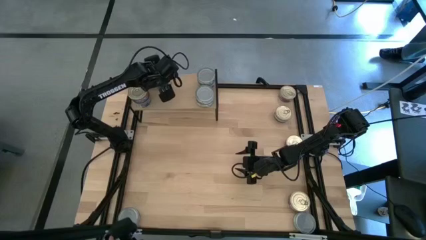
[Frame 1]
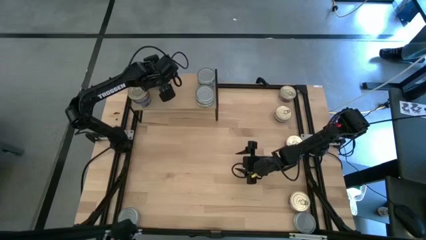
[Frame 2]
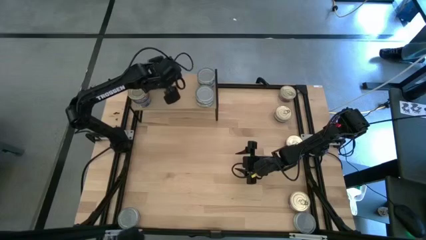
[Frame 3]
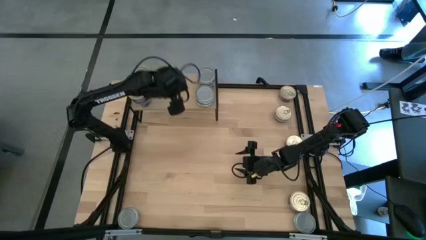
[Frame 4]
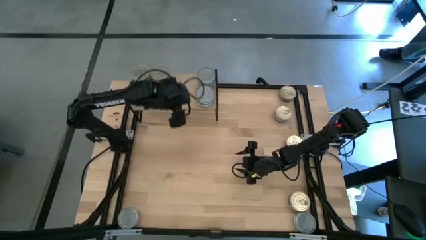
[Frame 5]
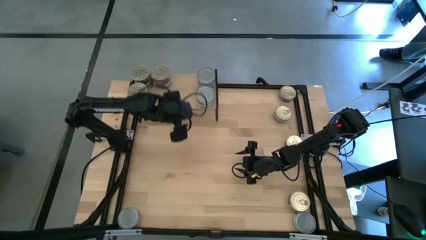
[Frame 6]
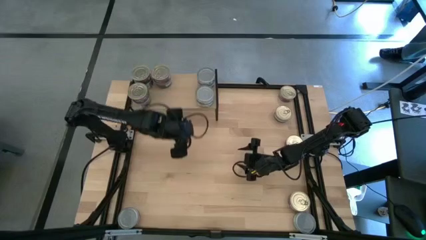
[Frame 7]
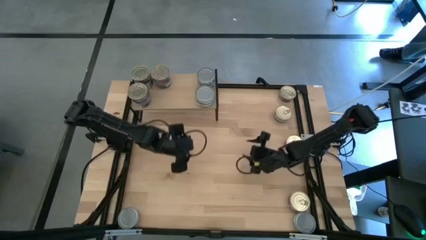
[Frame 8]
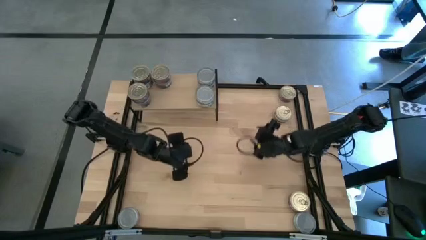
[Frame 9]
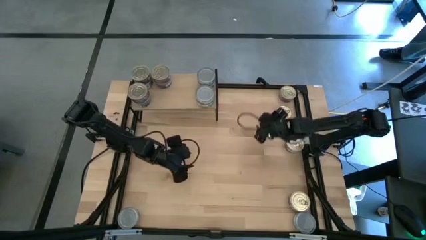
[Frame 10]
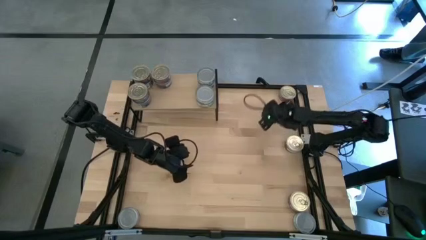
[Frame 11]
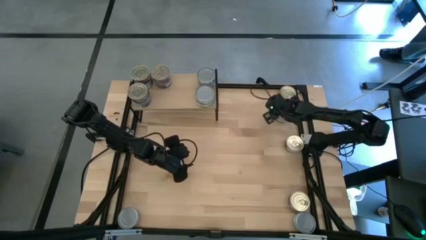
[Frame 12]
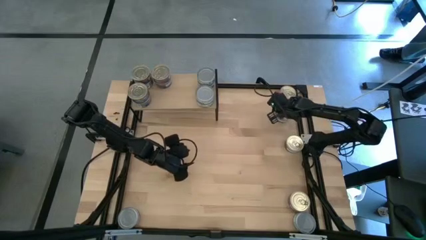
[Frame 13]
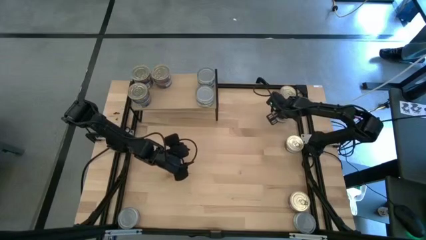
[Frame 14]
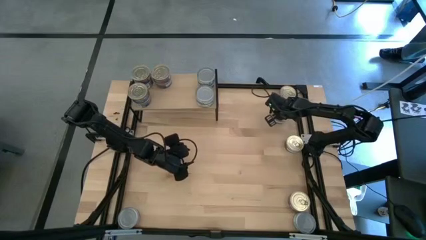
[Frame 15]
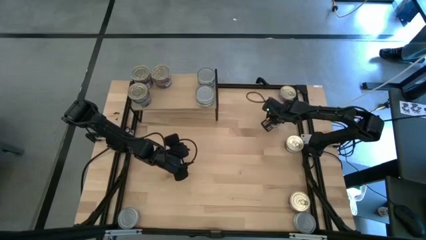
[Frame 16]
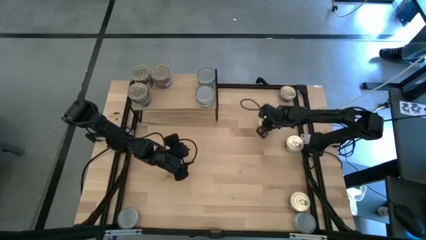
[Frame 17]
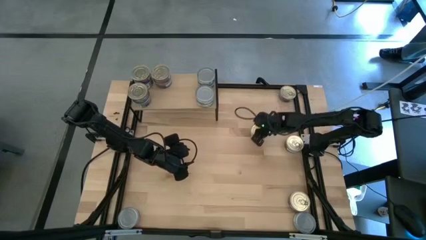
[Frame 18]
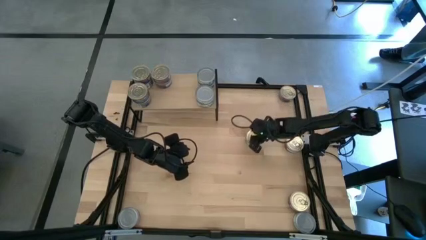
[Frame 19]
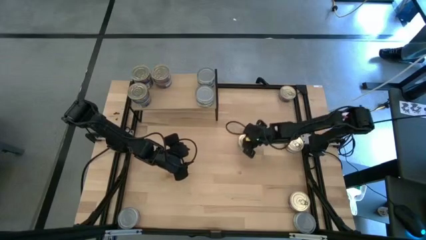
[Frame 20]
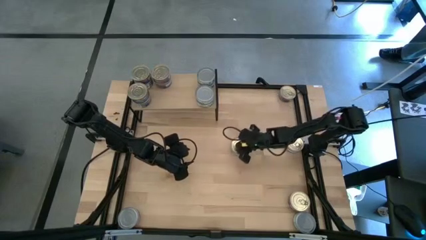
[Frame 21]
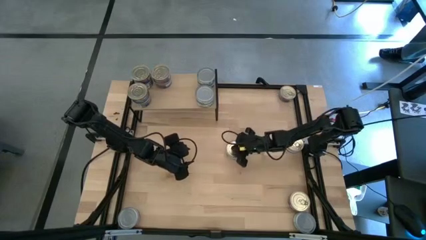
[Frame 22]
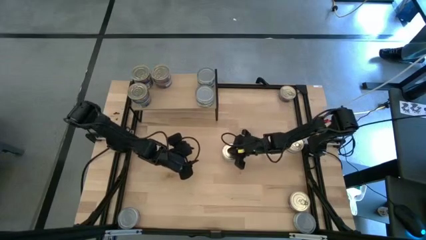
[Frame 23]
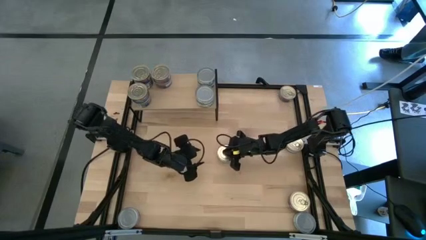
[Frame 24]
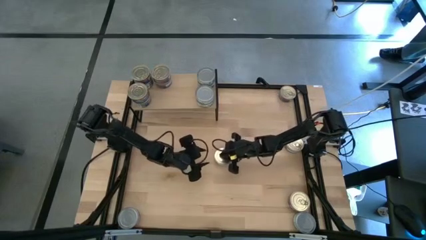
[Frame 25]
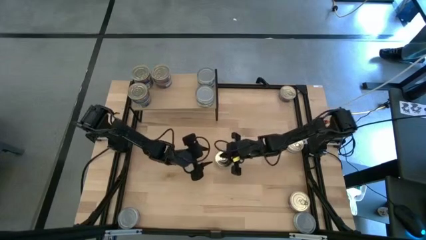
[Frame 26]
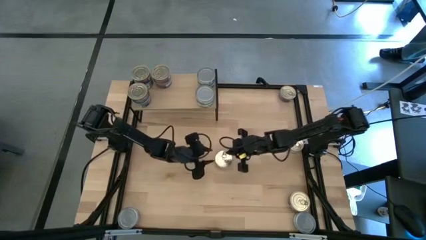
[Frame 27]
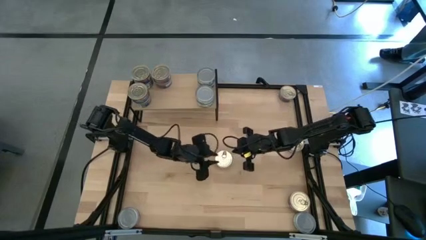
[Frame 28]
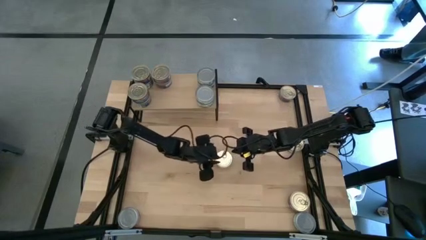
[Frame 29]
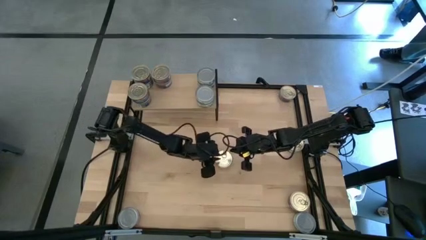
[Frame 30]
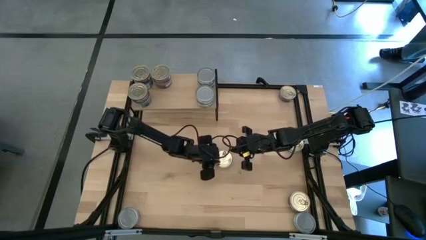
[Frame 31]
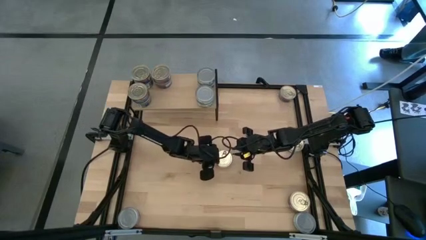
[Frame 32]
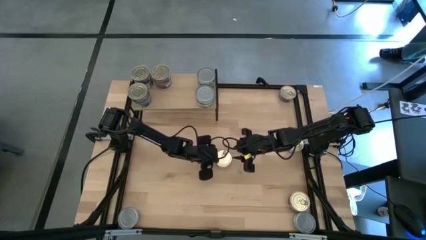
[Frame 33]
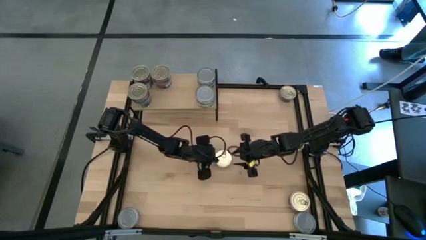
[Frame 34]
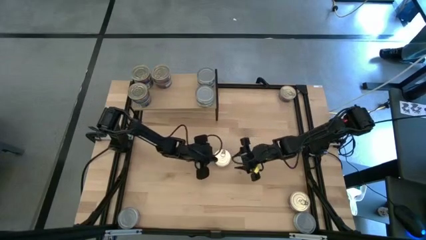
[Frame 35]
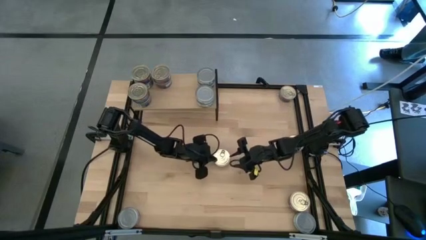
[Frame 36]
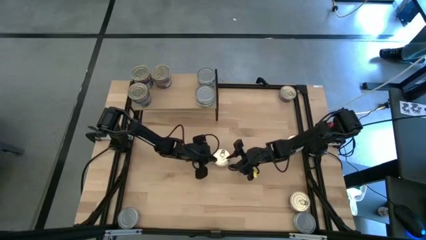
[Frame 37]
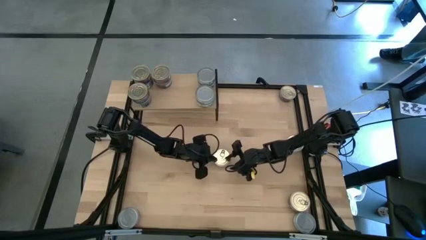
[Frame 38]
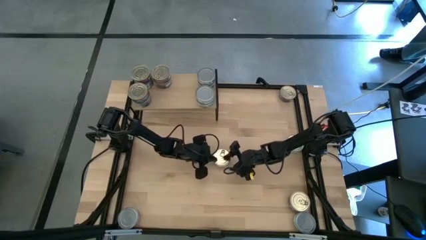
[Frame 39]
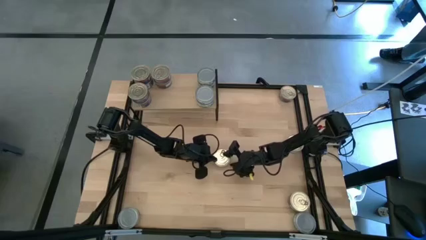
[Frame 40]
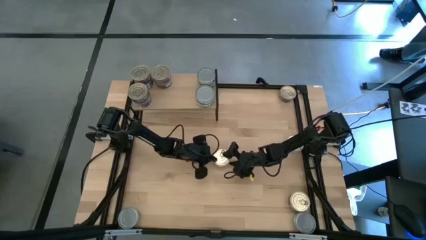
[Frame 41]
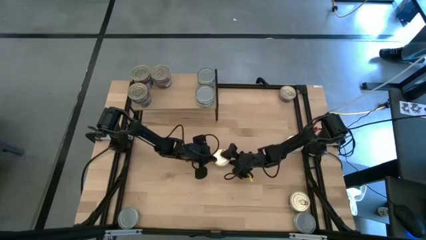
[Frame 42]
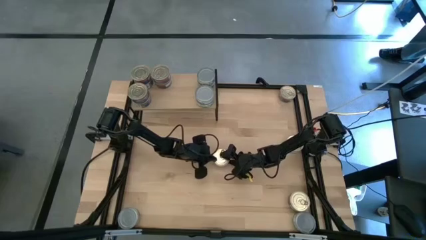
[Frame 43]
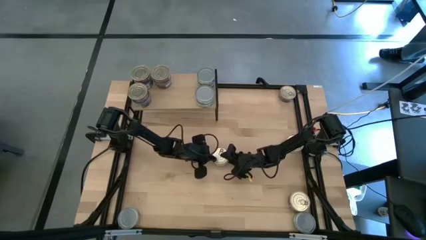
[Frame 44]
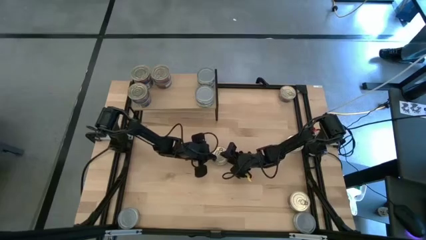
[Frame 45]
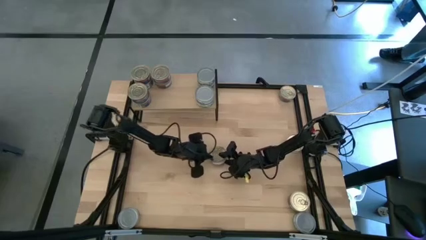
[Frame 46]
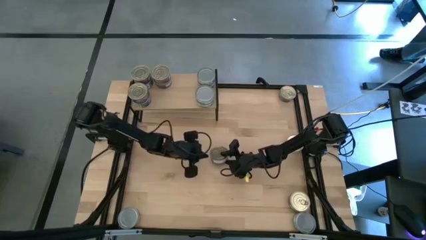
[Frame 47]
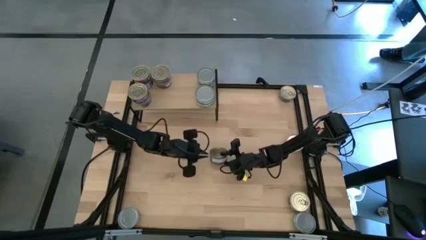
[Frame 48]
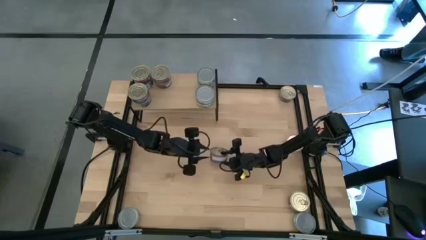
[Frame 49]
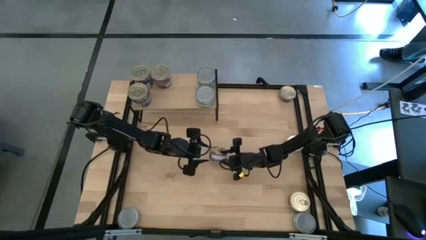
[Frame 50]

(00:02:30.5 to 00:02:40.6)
Task: Stack canned seafood by type on shelf
Put the blue tuna can on the shelf aligned with the other blue tuna can
